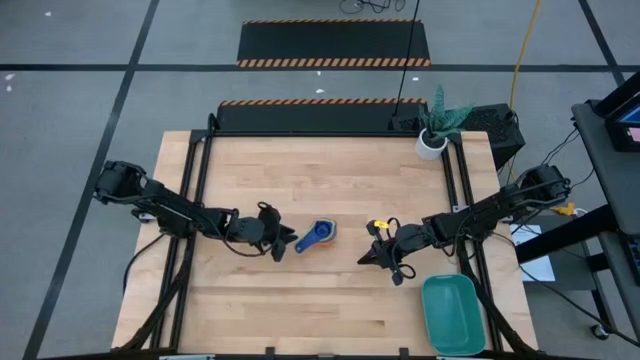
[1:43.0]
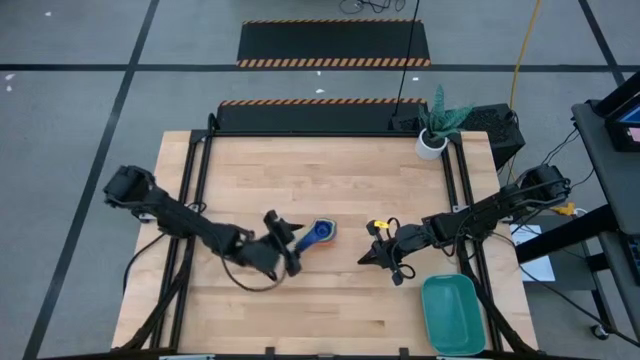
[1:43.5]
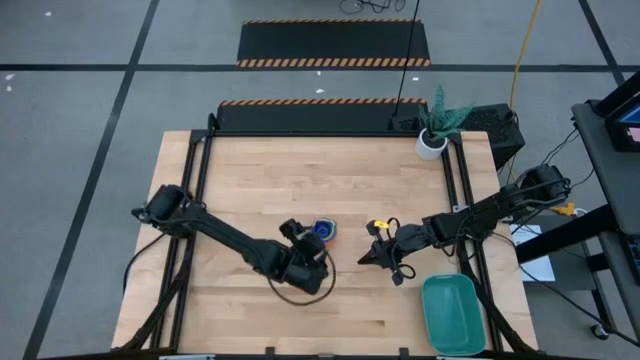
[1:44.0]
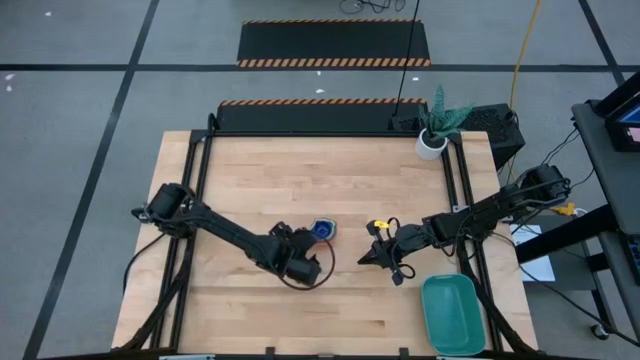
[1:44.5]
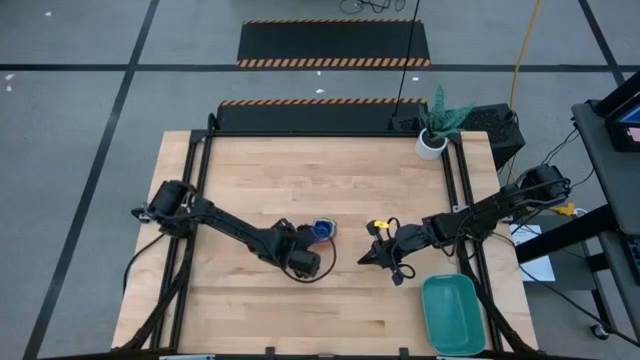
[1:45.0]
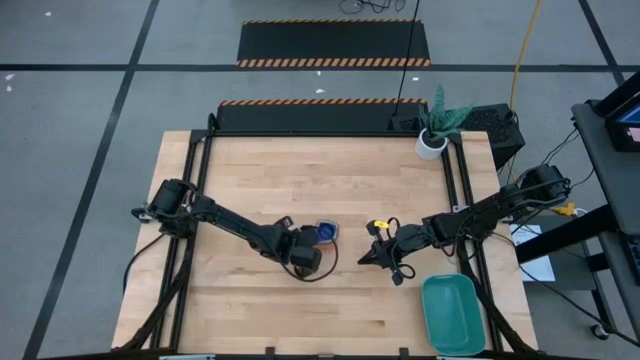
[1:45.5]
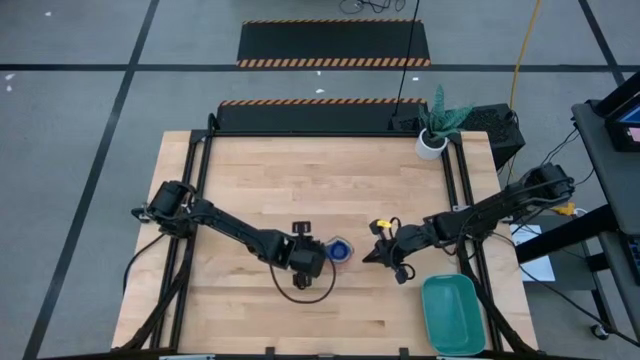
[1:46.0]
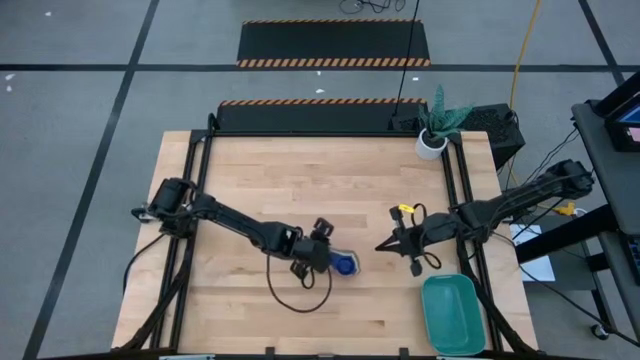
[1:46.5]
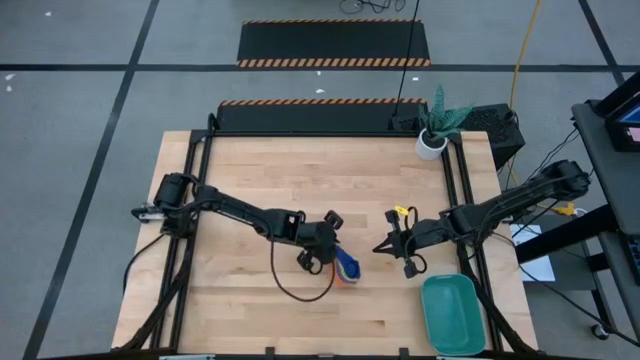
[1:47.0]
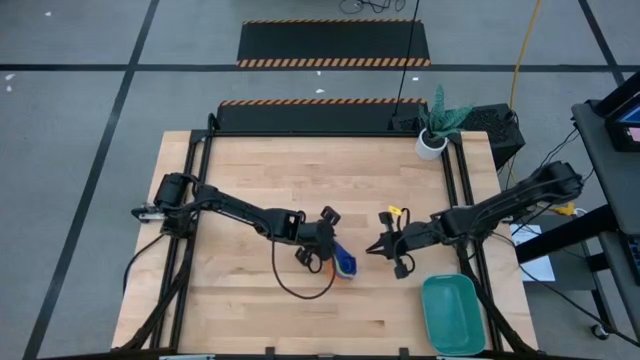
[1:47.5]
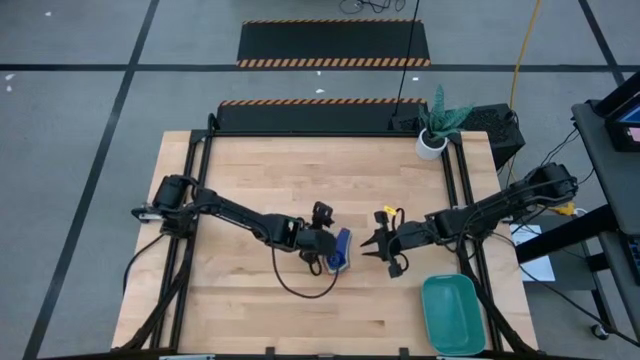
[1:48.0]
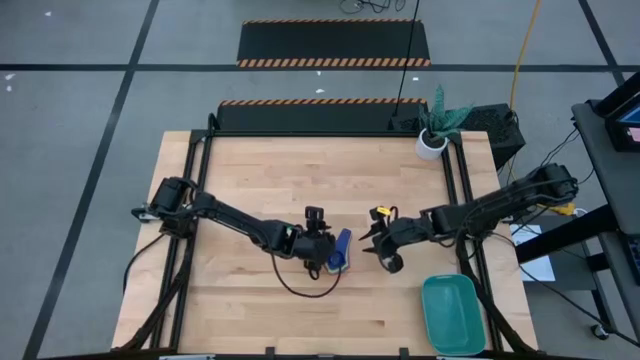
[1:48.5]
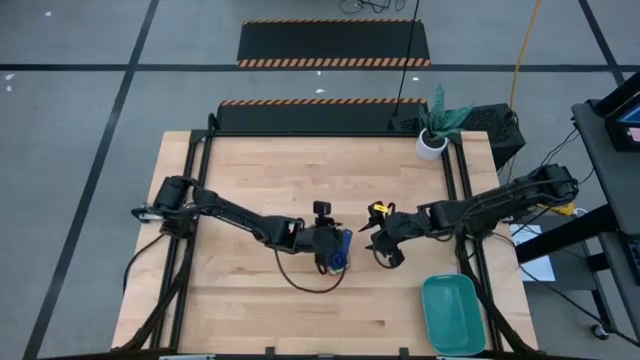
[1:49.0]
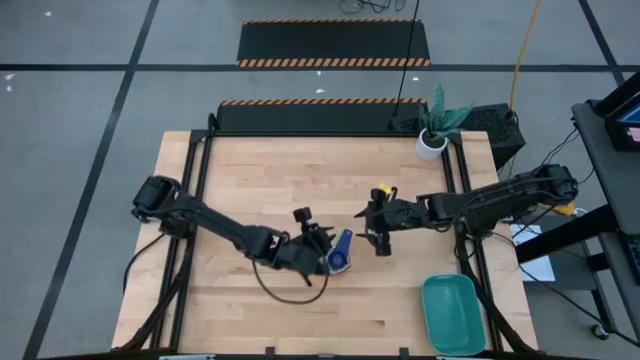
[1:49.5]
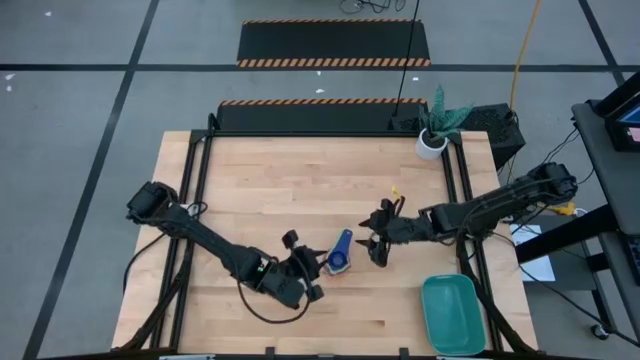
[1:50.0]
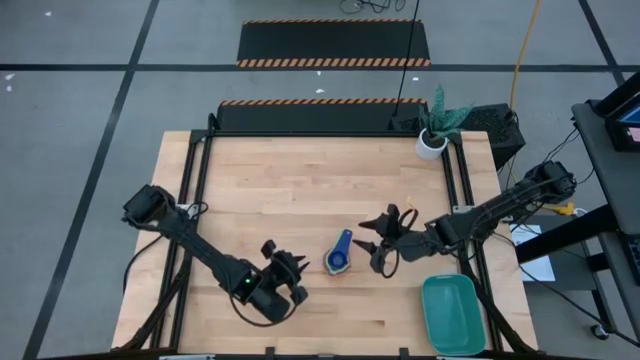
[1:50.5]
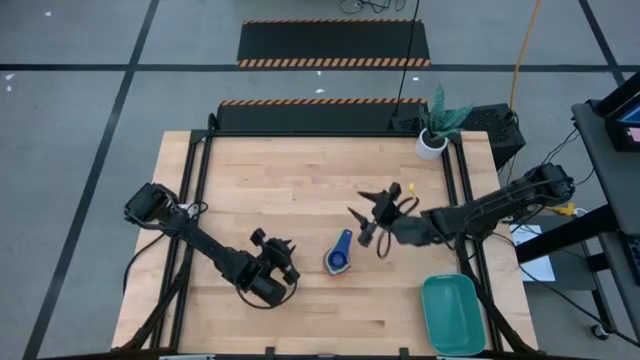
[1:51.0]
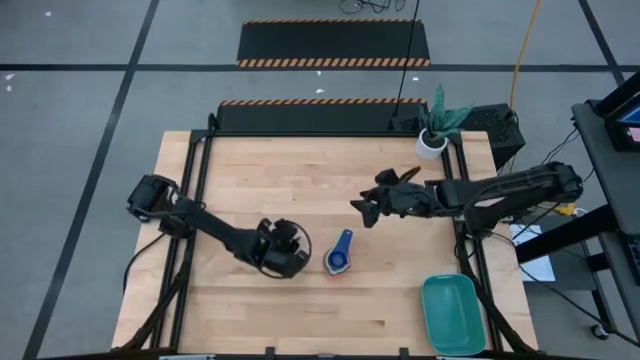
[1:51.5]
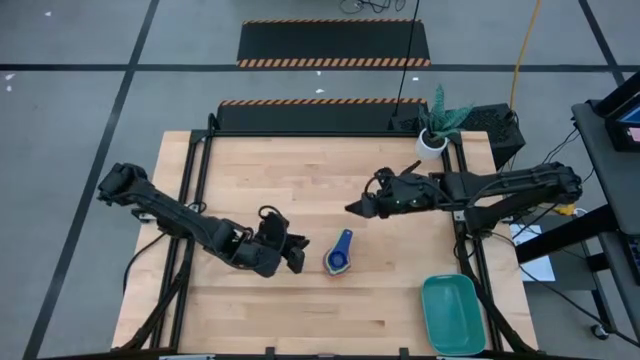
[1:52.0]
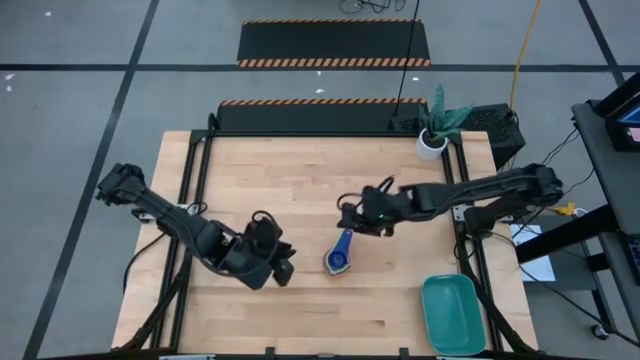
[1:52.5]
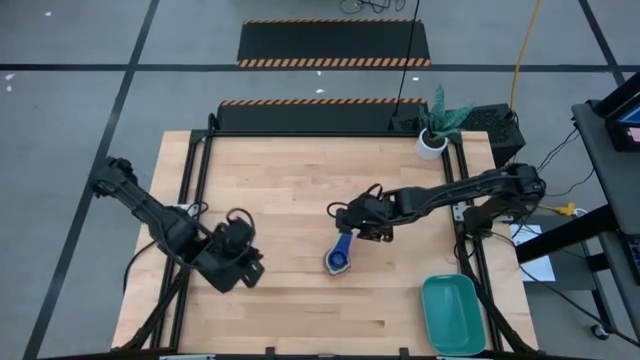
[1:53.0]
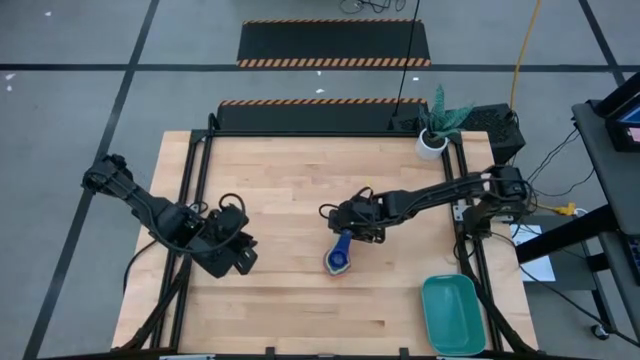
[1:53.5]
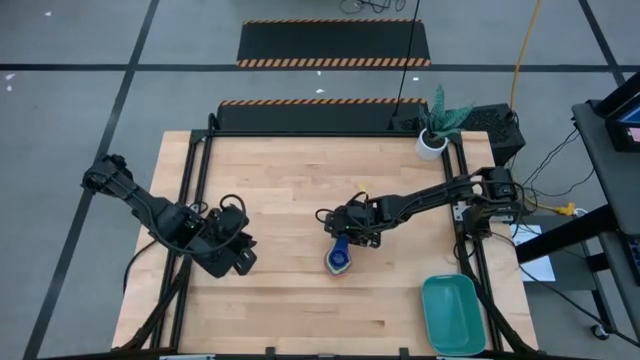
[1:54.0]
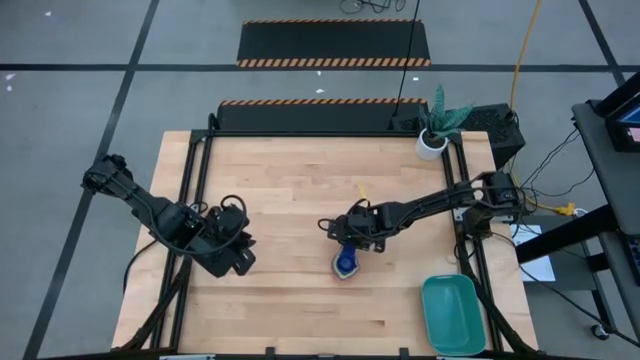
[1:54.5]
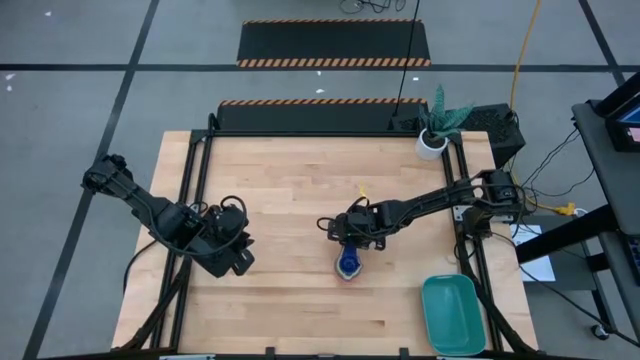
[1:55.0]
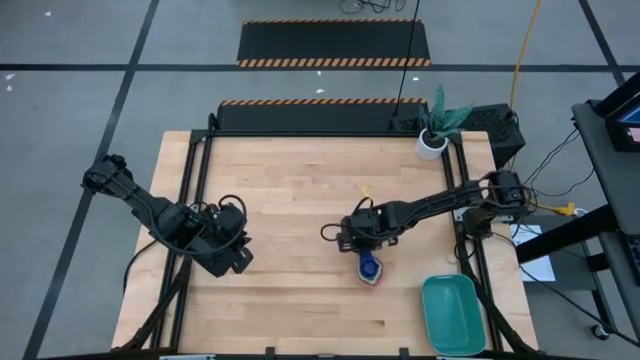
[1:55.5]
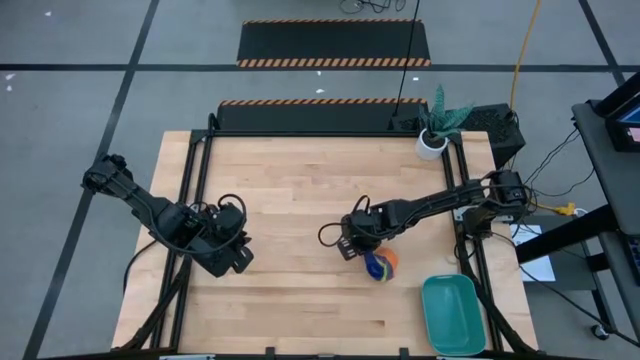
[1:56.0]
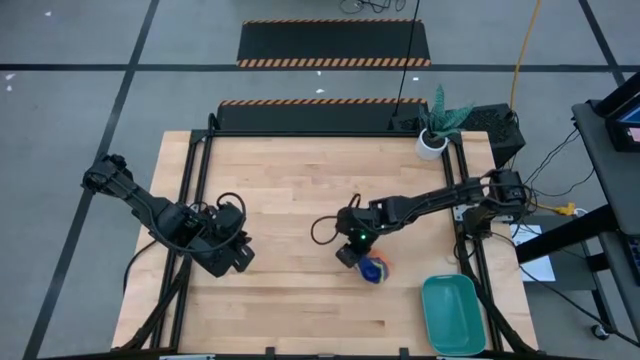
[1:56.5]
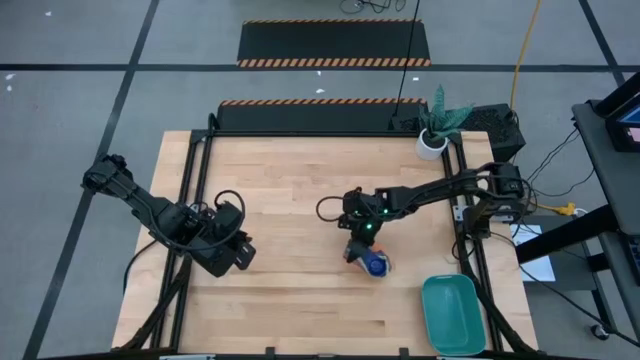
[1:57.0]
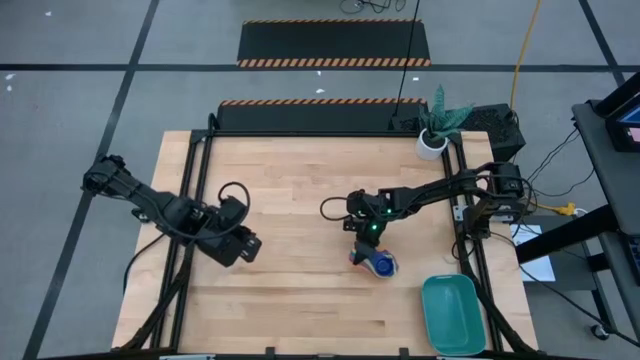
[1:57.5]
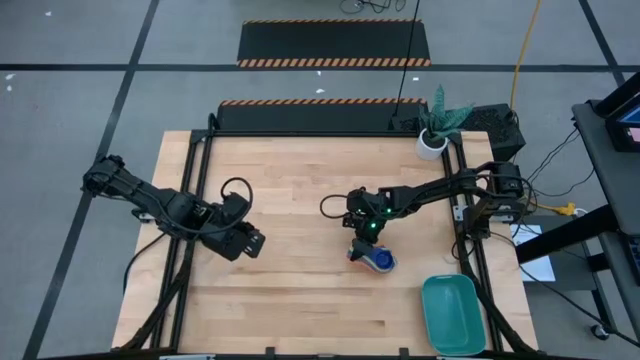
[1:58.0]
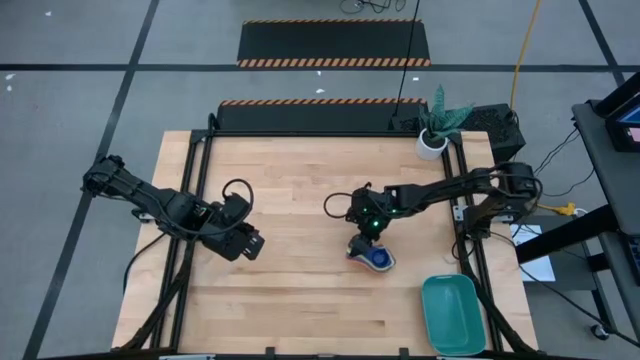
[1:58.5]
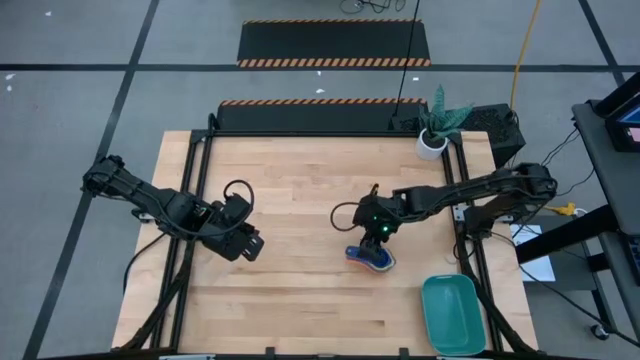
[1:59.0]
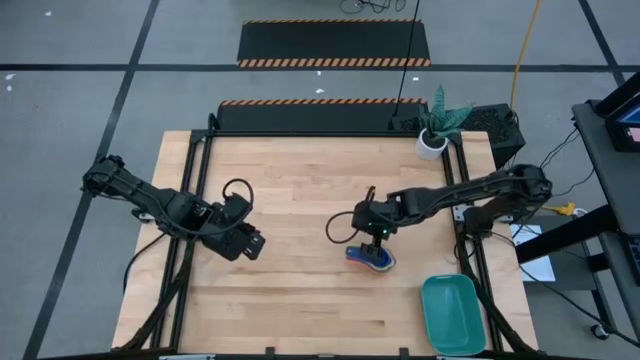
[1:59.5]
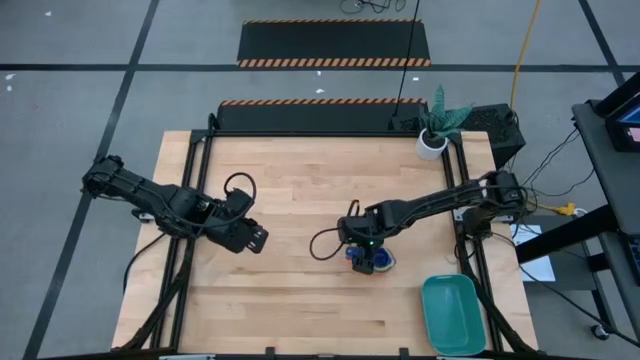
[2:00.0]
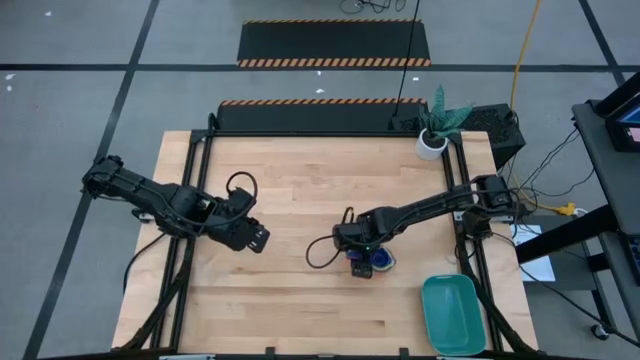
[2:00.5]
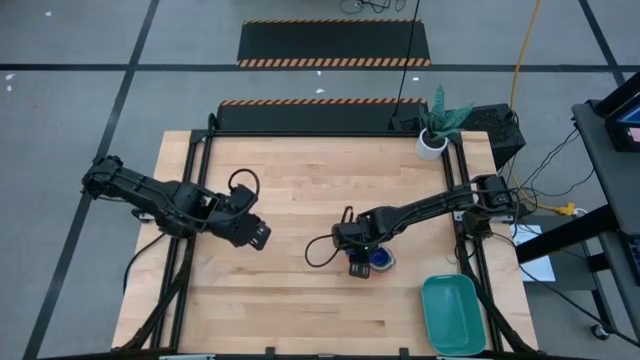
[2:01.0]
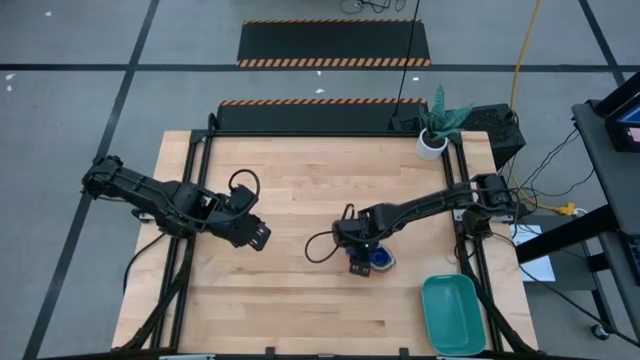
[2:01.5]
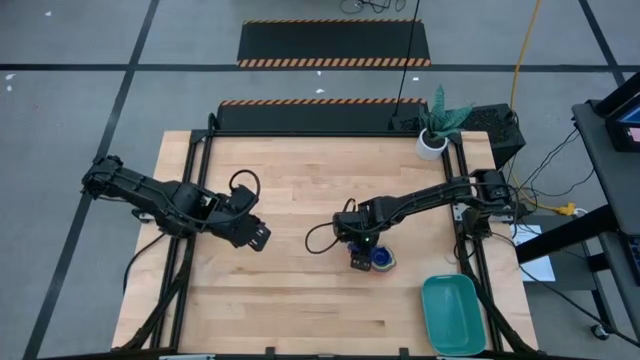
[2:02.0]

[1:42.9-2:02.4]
Task: Nest measuring cups in basket
Put the stacked measuring cups into the green bin

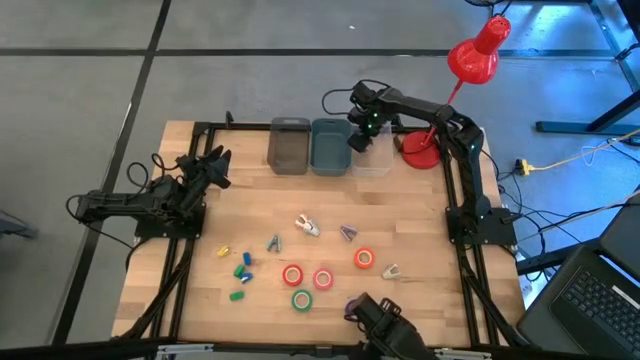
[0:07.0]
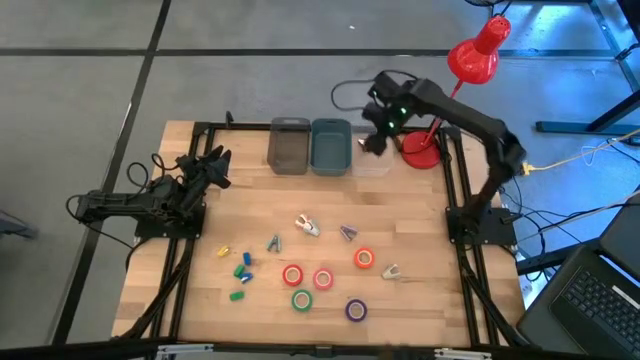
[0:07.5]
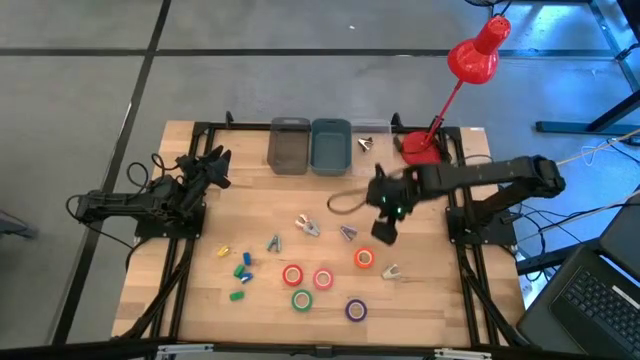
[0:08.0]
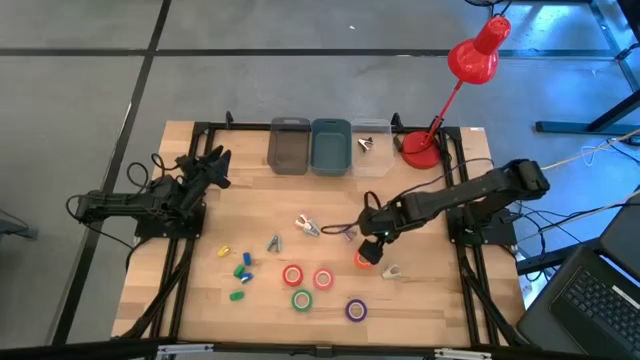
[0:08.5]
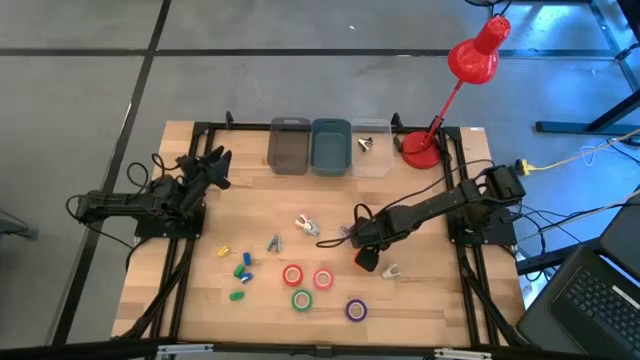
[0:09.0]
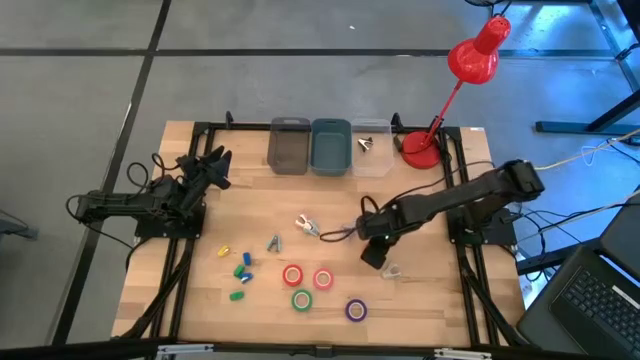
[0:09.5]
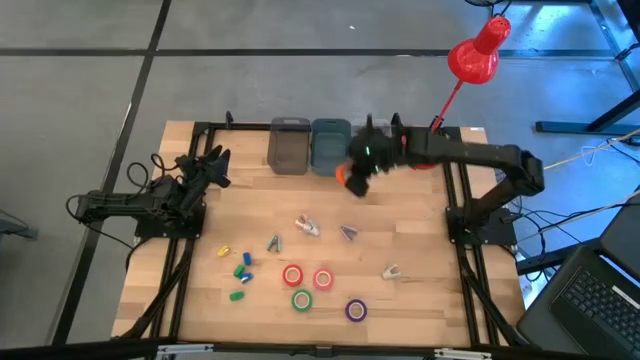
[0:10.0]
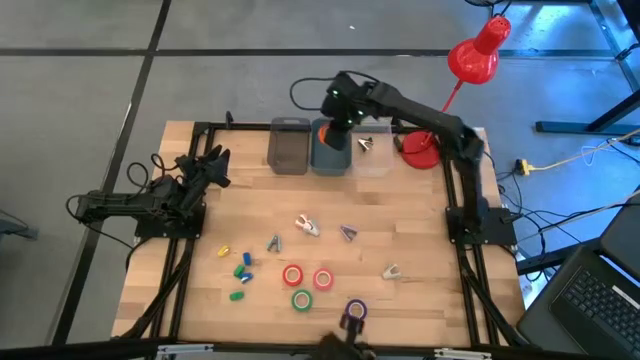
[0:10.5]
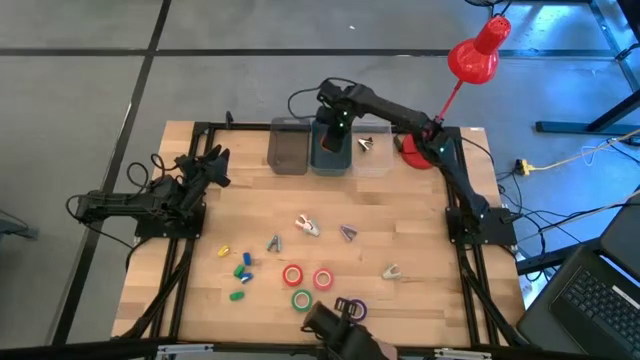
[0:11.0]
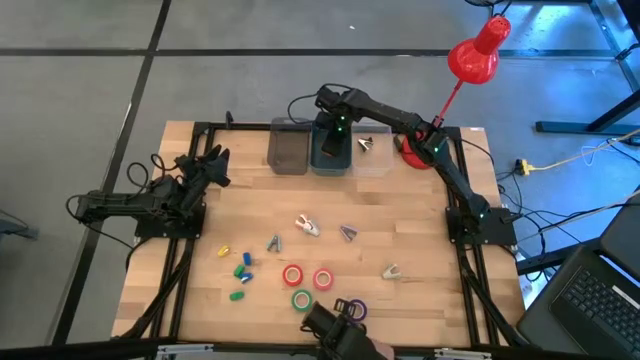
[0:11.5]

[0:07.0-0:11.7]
Task: Pick and place Stapler, Stapler remover, tape
Put the orange tape into the green bin
